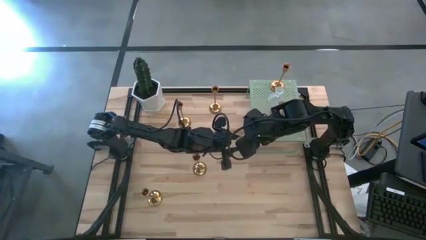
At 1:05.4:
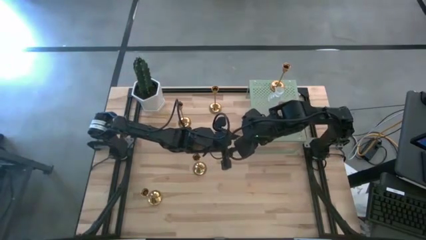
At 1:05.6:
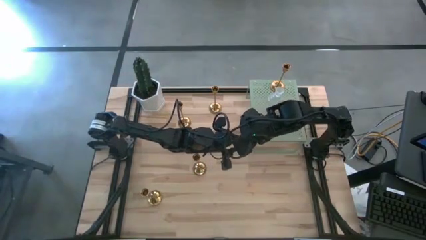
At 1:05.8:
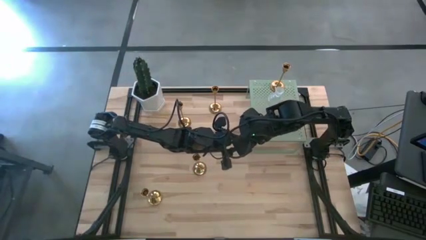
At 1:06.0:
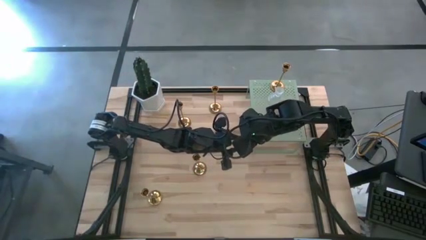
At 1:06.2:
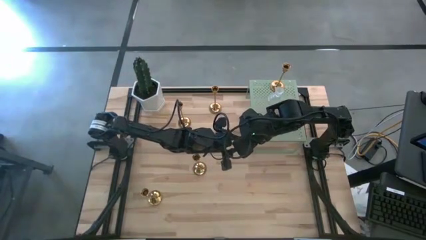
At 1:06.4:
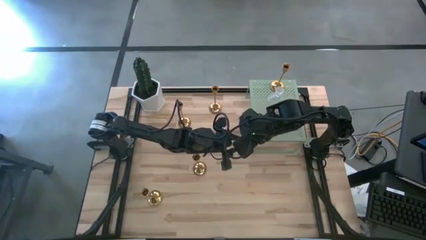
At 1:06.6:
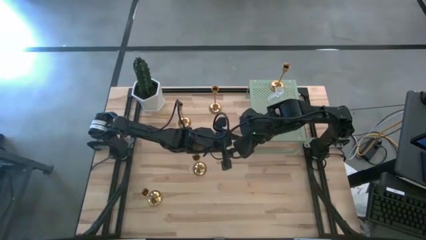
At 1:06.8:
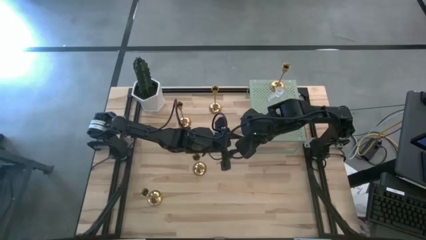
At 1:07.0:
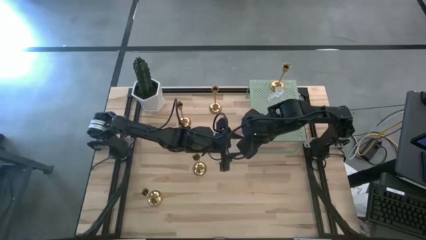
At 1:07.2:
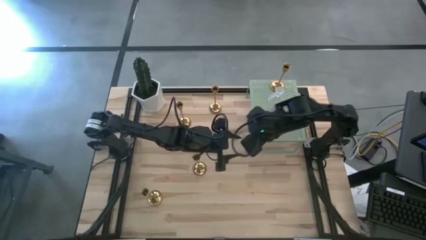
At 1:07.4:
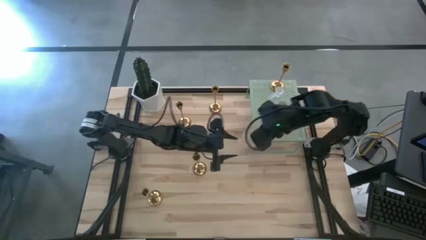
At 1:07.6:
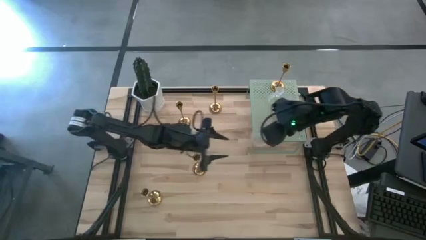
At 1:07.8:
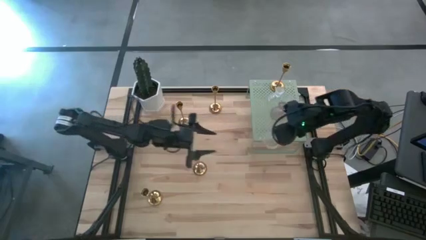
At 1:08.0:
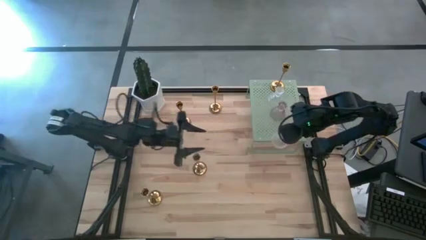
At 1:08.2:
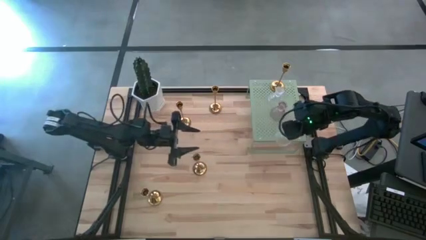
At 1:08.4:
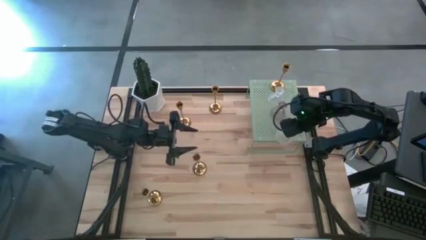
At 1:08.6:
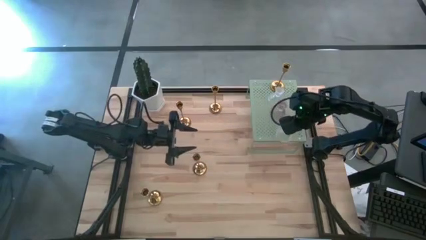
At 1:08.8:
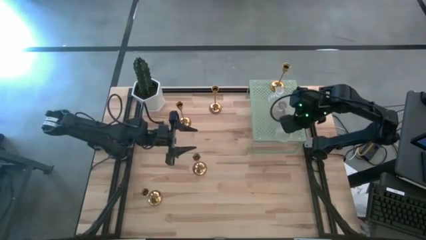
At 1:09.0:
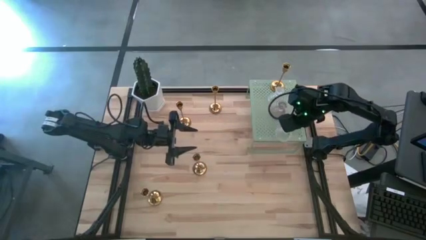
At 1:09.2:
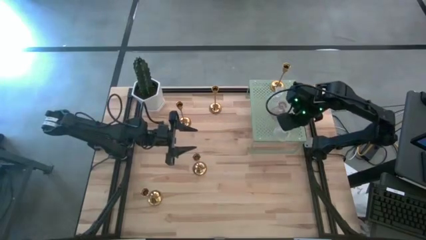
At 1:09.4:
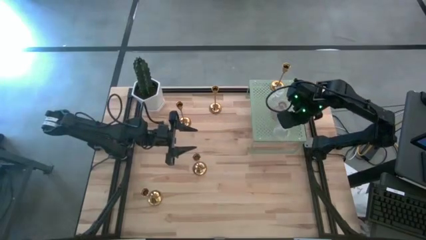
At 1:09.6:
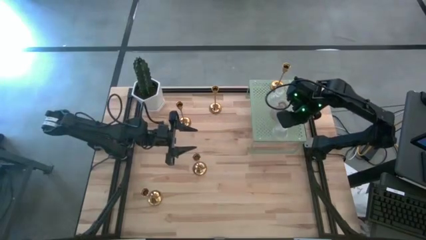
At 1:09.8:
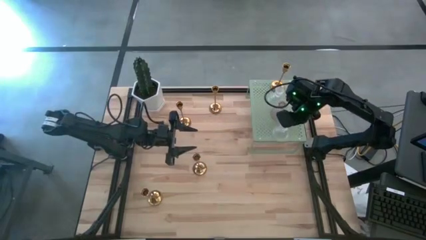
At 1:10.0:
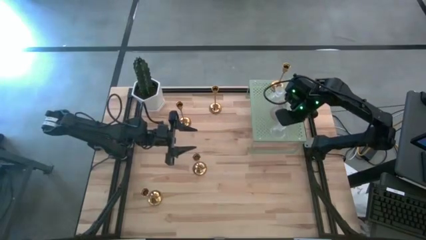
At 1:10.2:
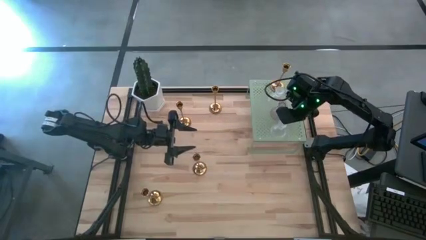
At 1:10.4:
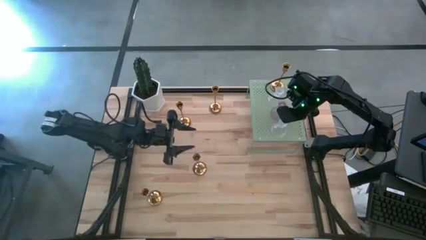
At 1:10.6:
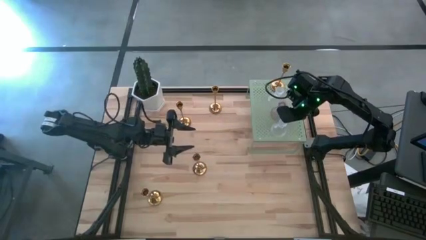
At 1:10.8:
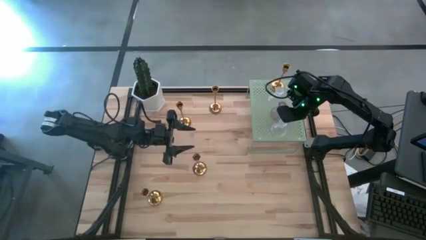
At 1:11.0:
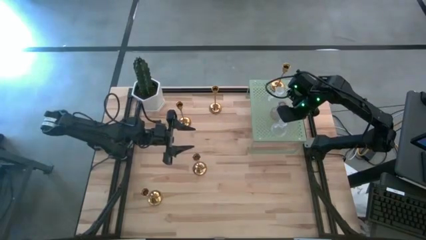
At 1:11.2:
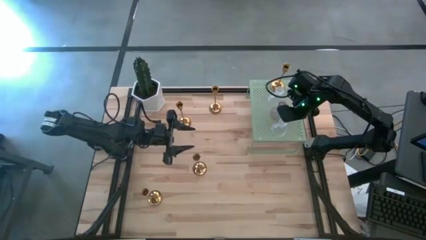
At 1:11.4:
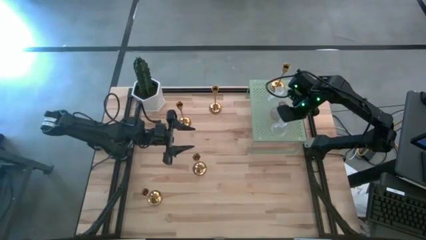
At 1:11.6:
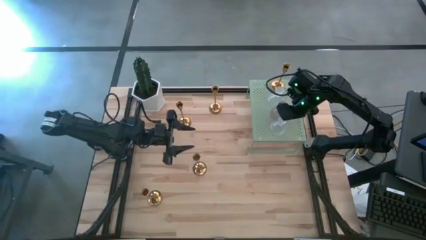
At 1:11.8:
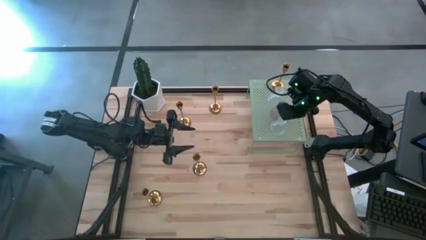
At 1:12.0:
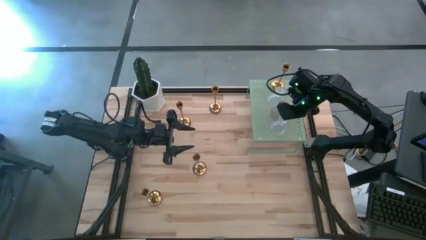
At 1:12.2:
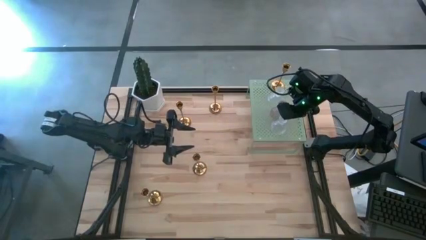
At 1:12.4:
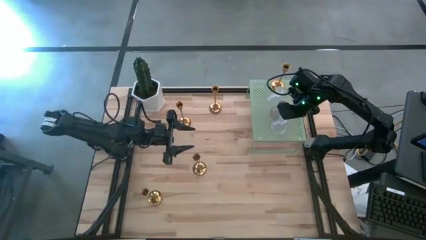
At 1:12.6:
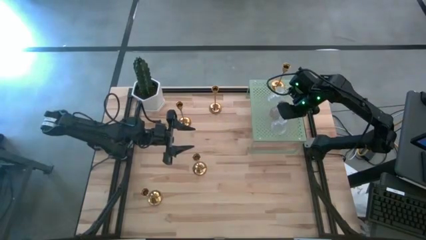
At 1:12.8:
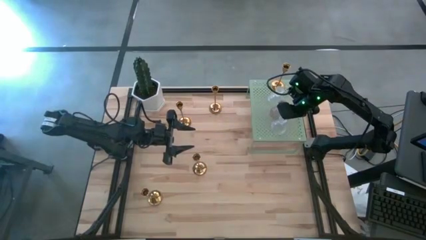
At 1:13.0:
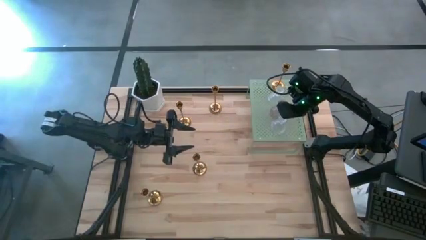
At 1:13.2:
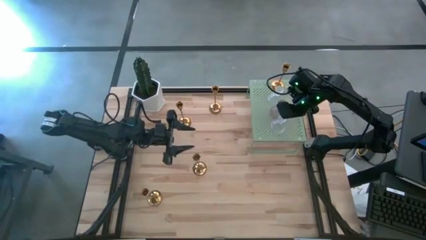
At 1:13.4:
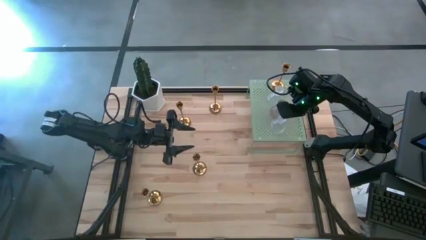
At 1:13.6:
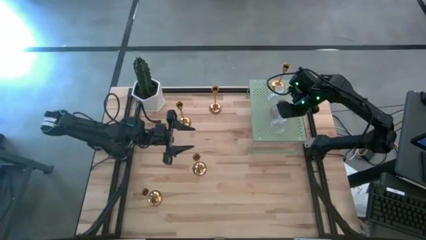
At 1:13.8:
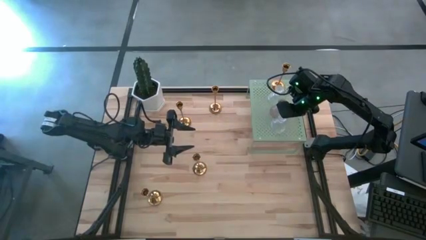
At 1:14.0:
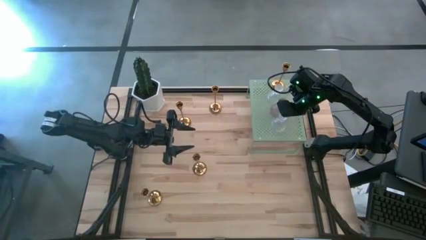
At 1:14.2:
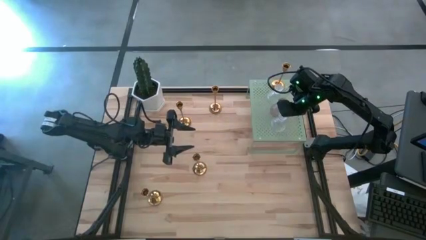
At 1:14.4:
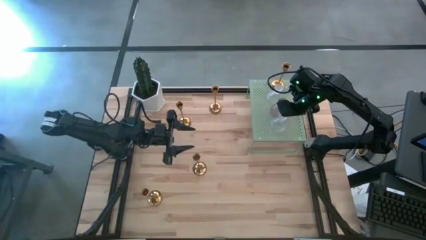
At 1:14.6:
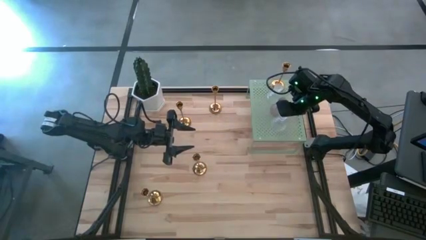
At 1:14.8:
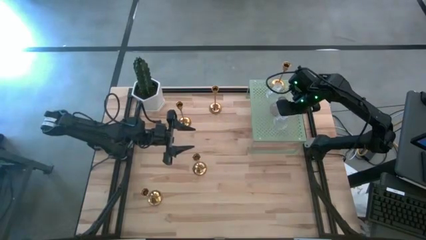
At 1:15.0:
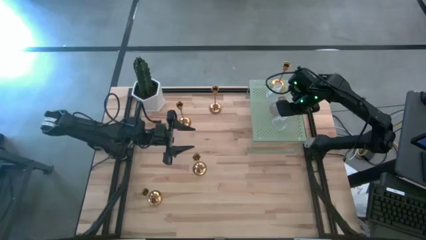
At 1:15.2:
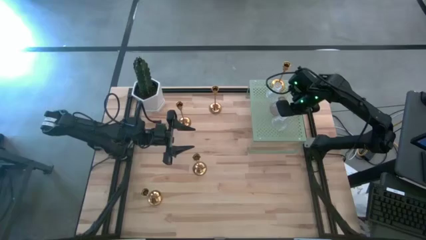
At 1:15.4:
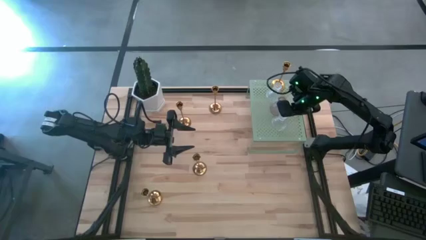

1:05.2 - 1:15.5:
Task: Pick & Place candle stick holders
Put the transparent glass candle holder on the shelf

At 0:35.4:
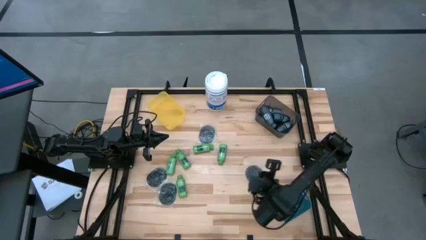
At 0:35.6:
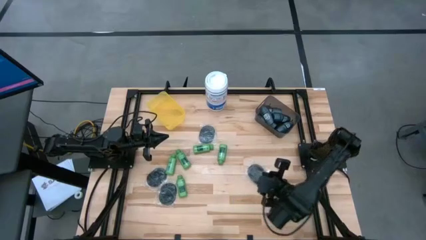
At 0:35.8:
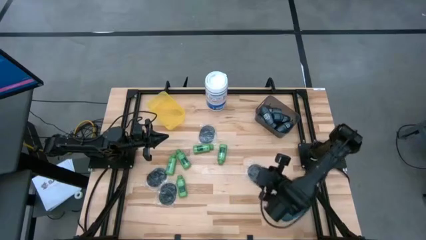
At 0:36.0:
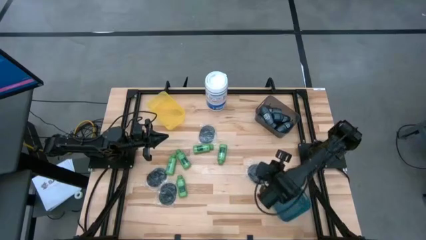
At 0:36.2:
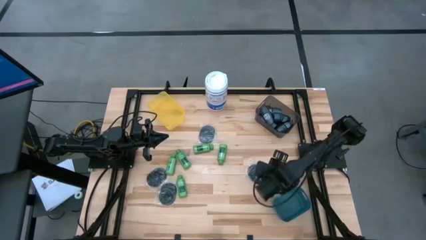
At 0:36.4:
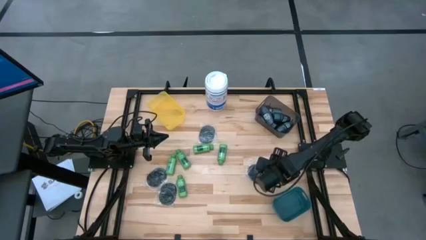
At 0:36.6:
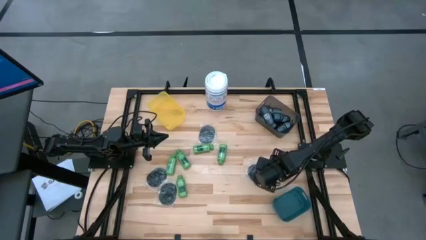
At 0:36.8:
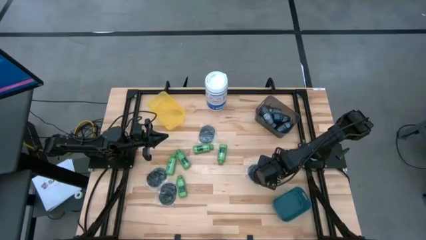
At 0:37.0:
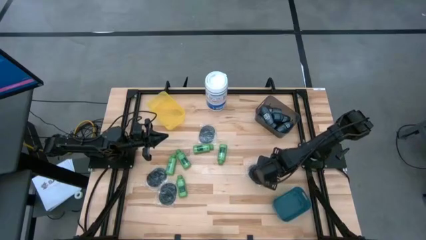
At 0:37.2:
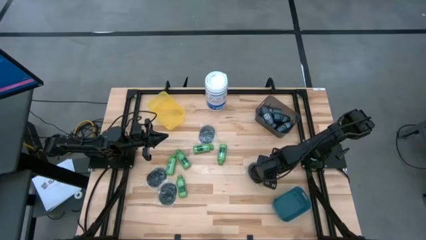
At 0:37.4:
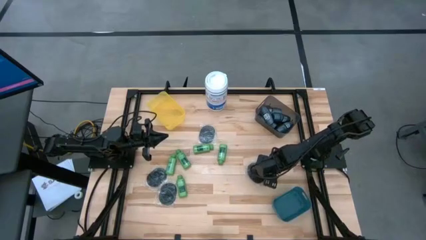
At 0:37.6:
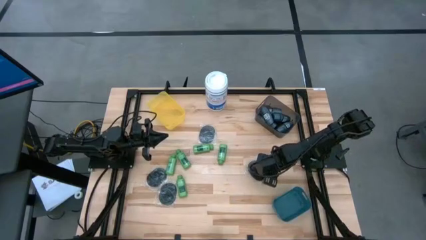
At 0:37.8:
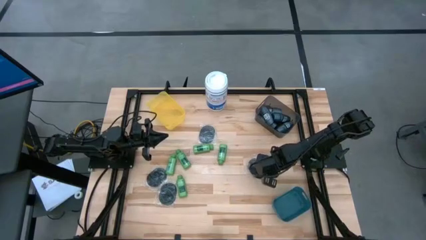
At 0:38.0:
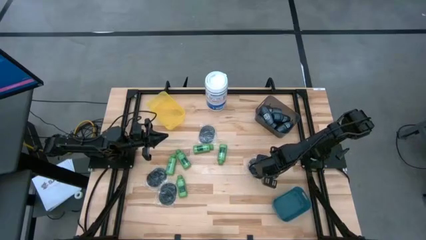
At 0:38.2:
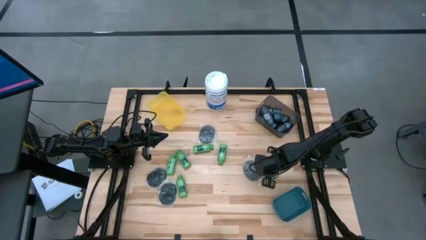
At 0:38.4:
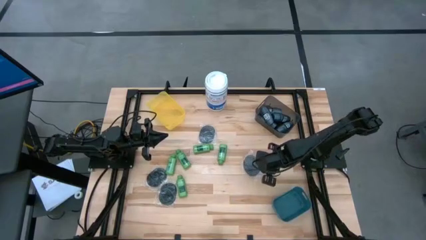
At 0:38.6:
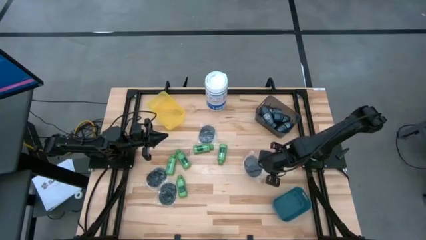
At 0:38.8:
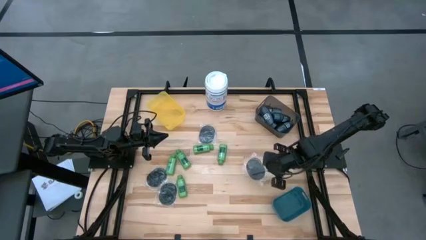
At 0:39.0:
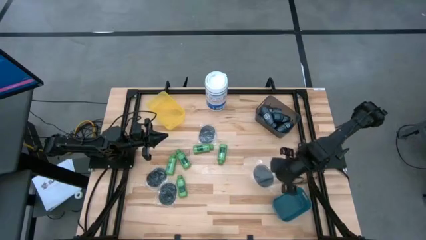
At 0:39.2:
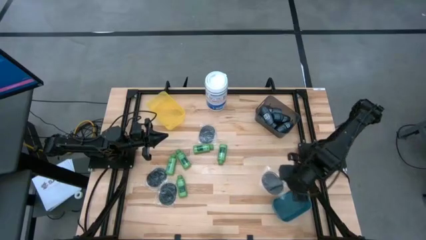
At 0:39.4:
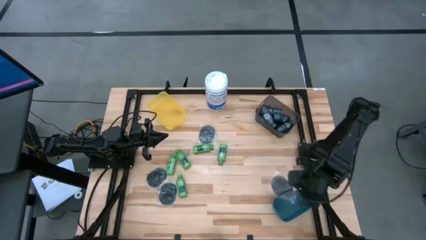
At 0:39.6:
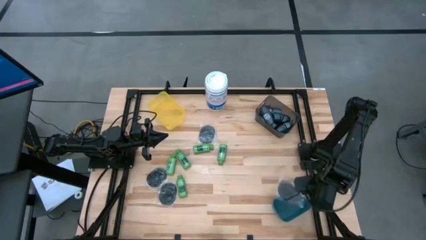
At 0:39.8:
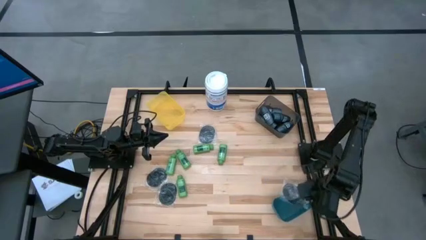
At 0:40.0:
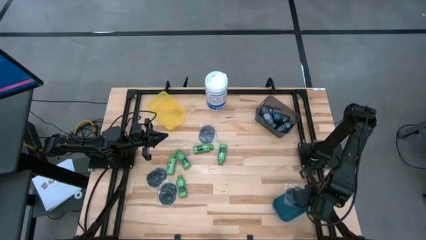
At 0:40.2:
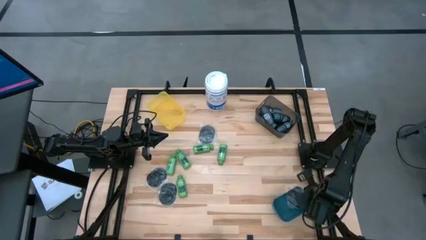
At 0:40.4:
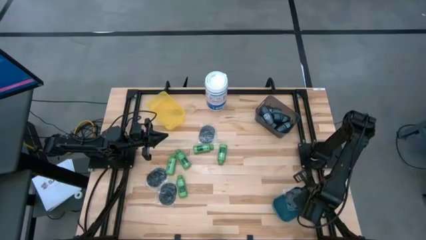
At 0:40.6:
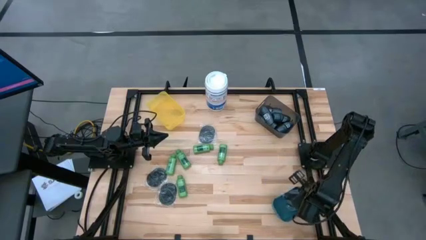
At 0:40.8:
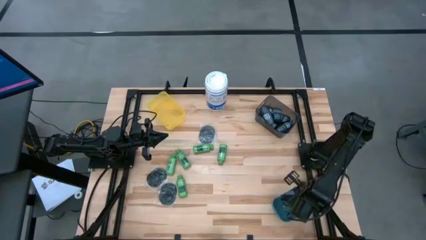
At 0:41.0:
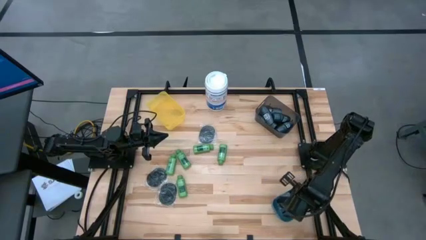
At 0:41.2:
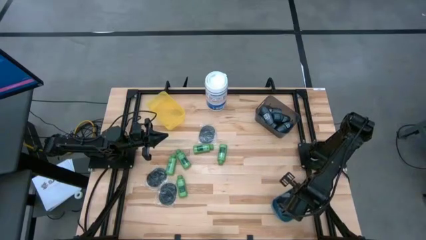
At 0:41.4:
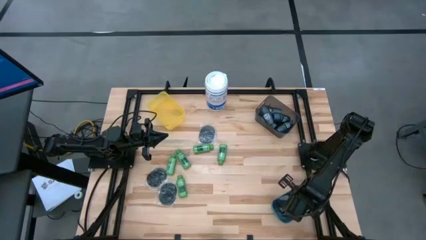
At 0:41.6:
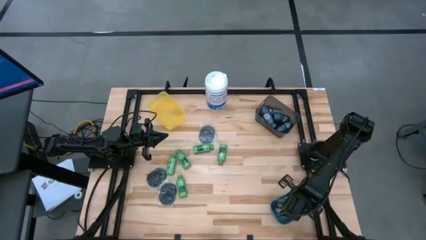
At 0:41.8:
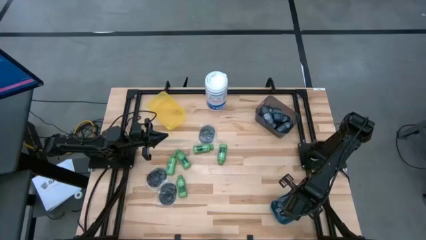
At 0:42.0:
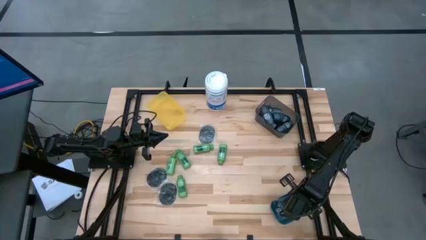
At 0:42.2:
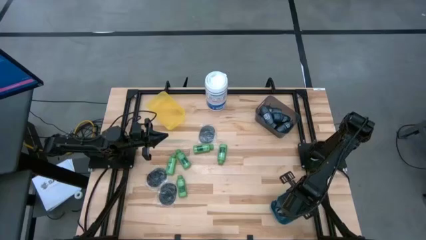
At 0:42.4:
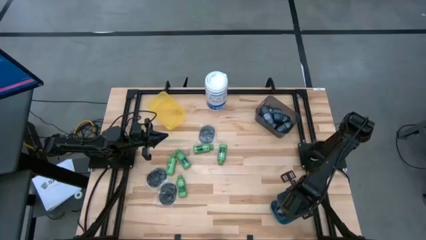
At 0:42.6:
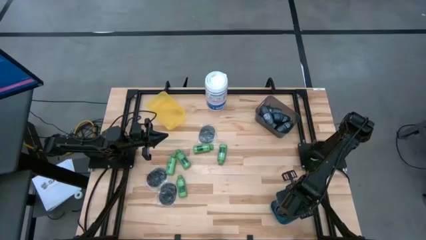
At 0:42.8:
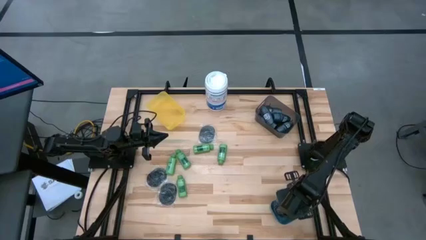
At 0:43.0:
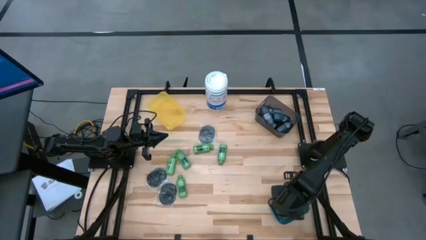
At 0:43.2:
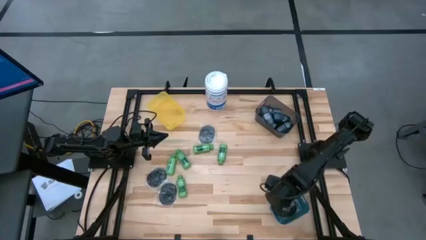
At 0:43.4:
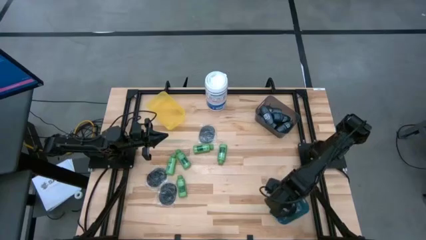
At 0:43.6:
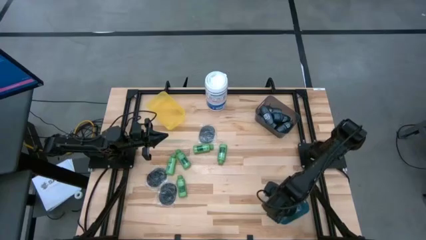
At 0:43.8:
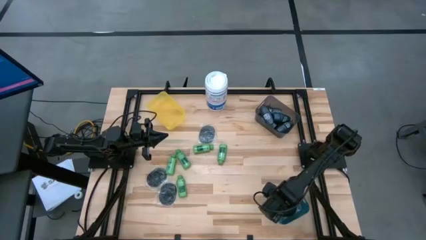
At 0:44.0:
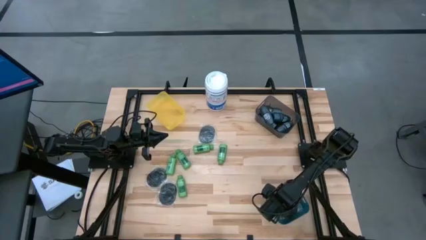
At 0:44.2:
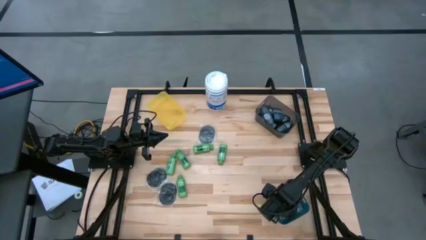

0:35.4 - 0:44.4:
Task: Pick & Place Travel size toiletries
Put the black hairbrush into the blue bin
